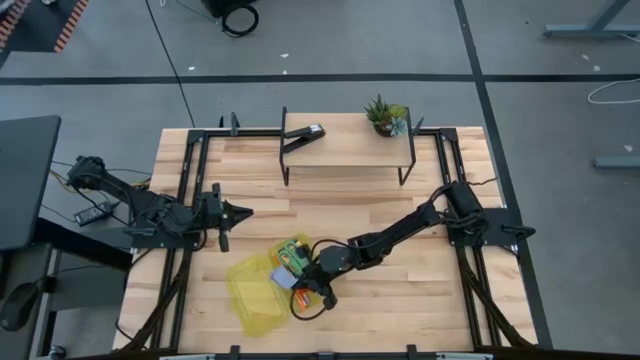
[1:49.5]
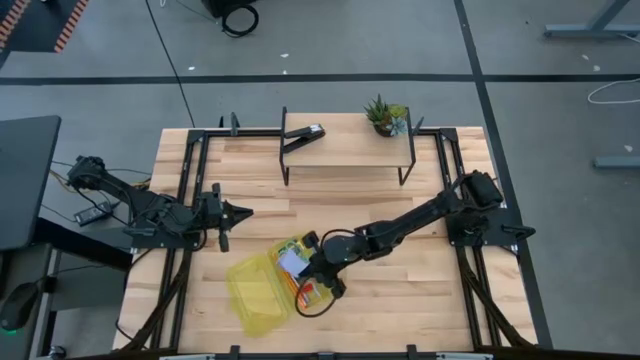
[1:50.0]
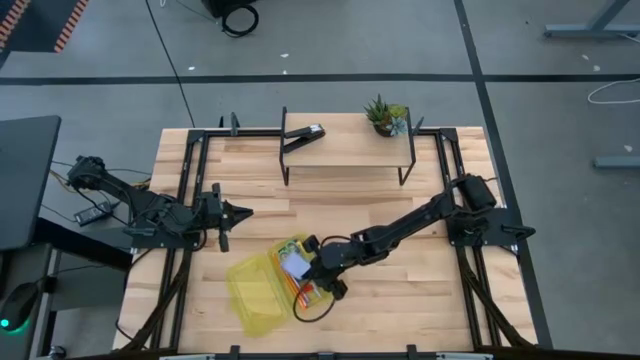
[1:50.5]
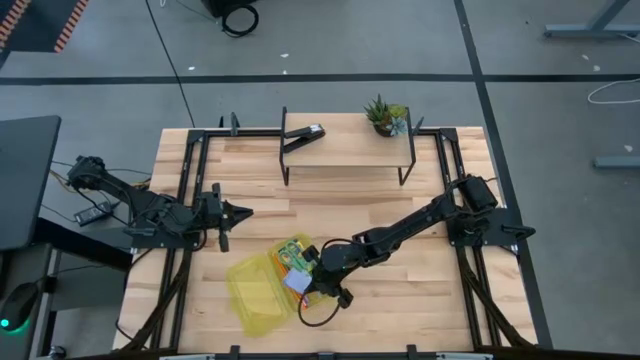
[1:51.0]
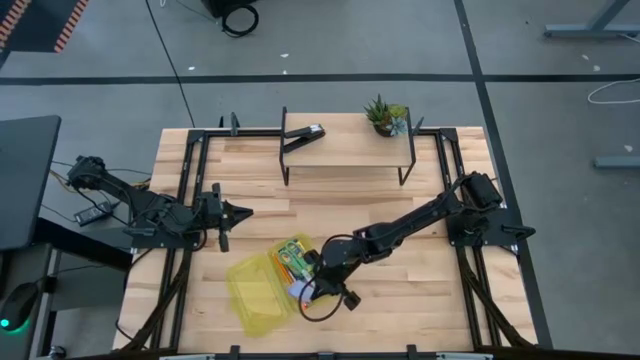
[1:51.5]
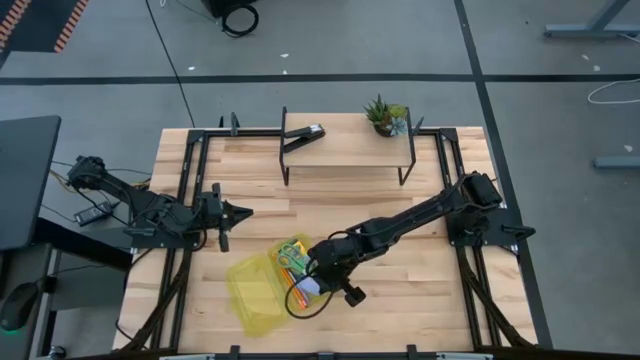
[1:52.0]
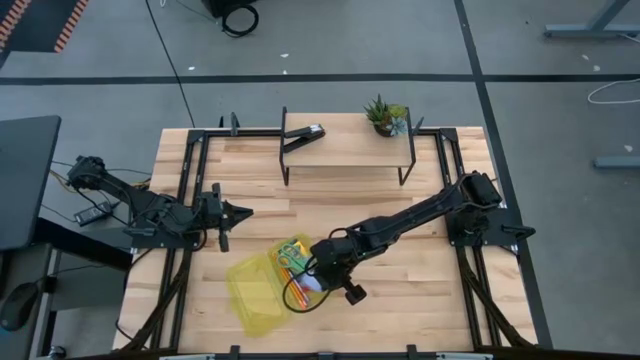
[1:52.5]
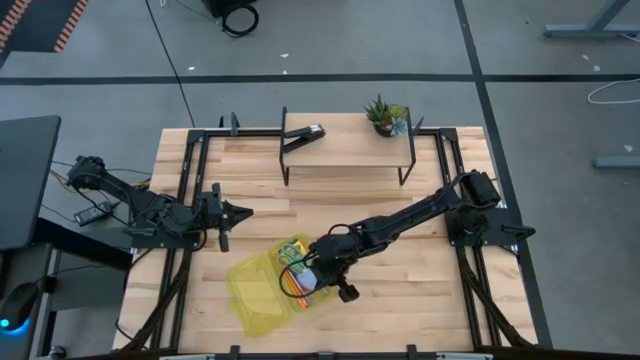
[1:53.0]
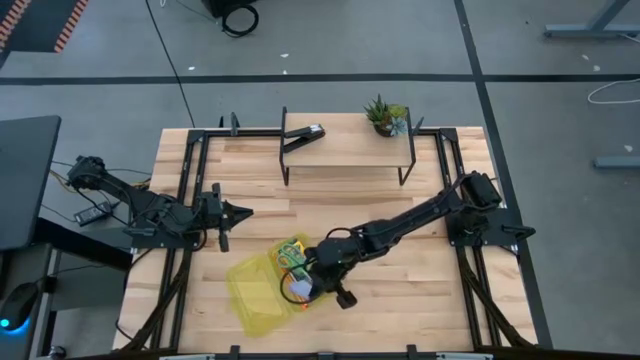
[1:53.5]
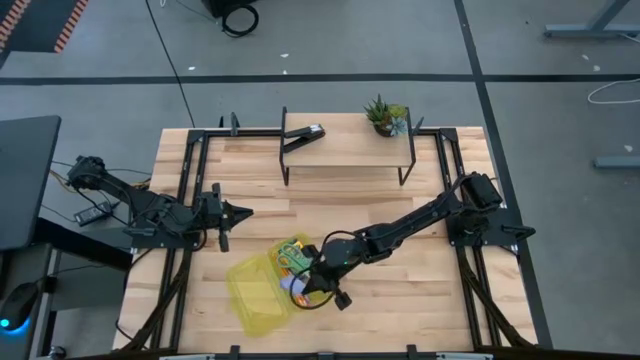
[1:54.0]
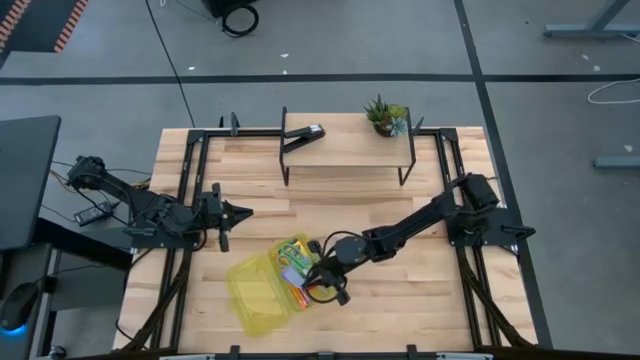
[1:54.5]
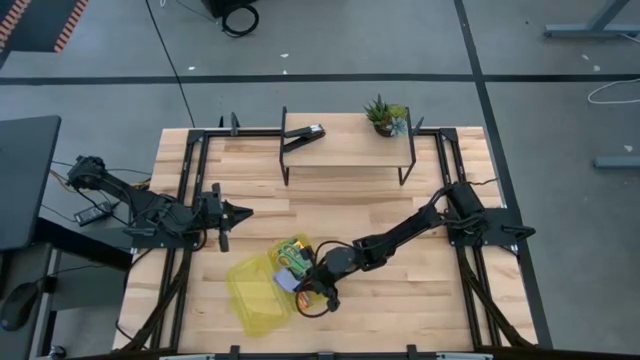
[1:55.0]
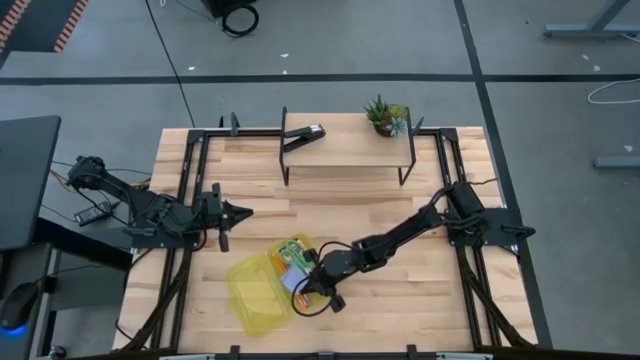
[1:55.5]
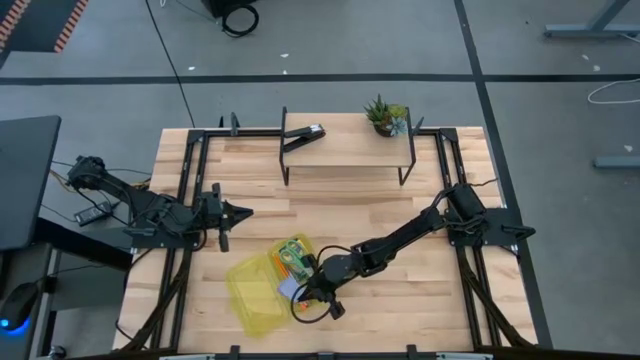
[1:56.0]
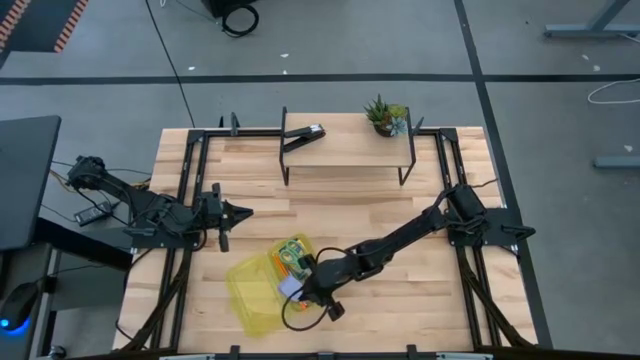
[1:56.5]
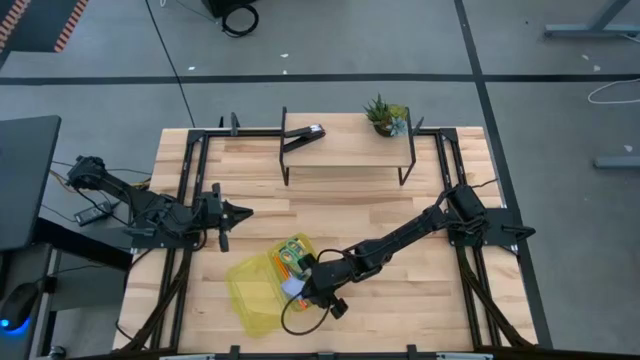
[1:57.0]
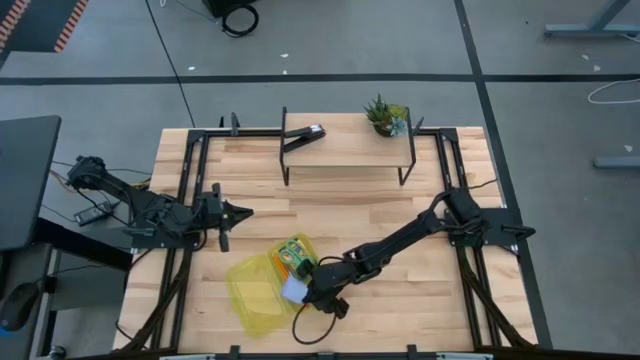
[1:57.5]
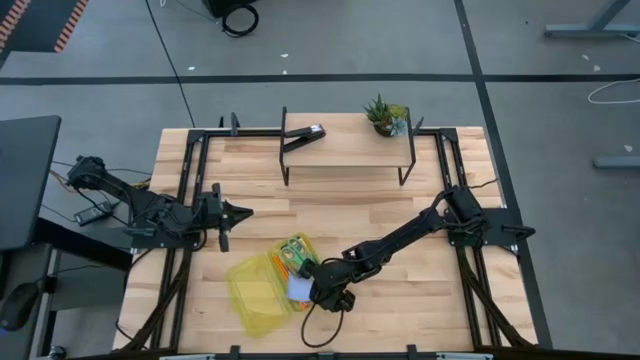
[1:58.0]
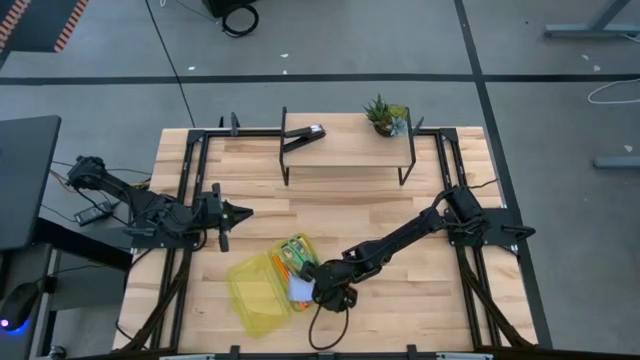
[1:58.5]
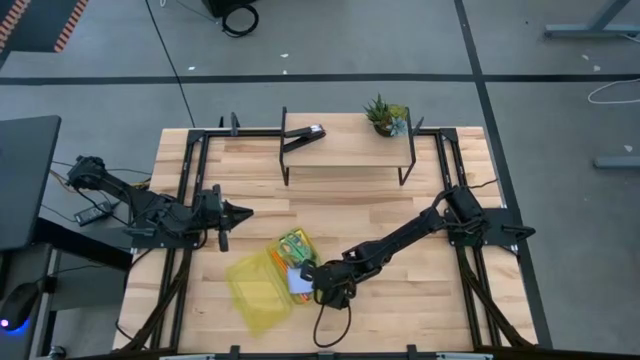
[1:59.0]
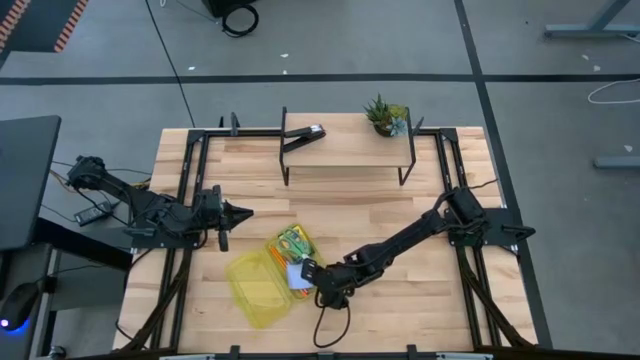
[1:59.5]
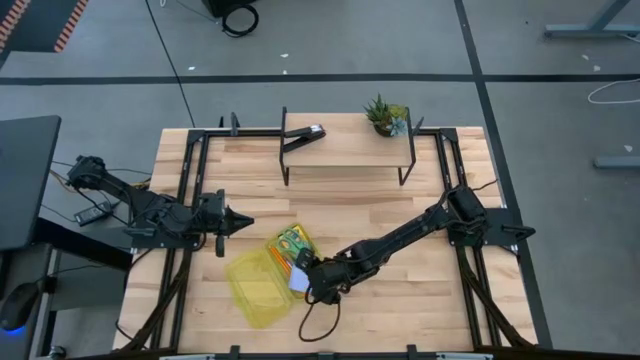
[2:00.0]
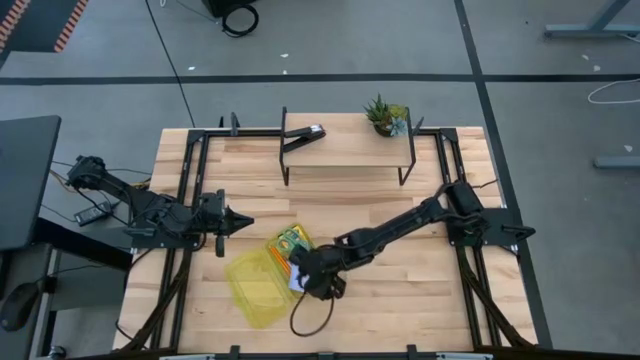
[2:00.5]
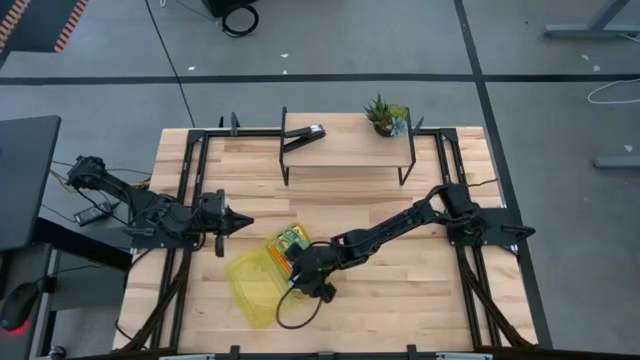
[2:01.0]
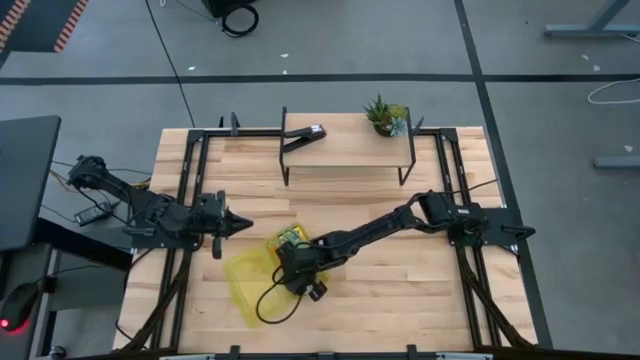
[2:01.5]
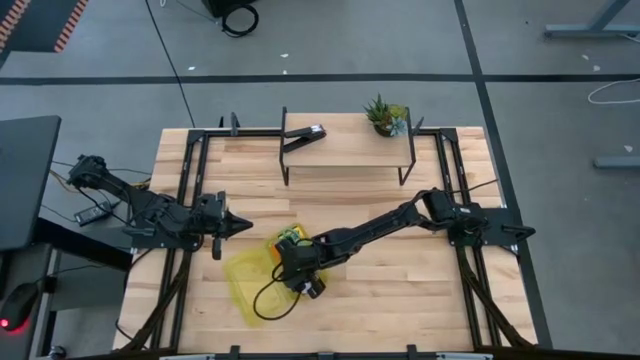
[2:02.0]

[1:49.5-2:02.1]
Task: Pack school essentials
Put the white sticky note into the supply box

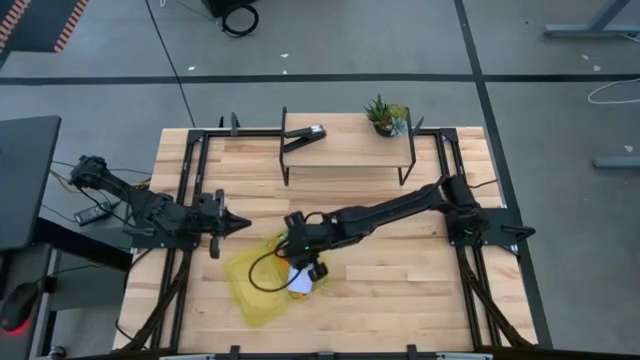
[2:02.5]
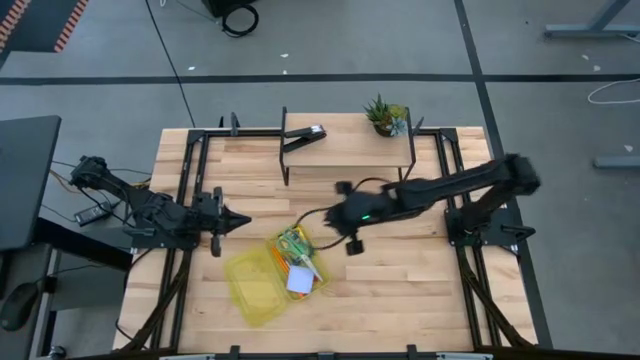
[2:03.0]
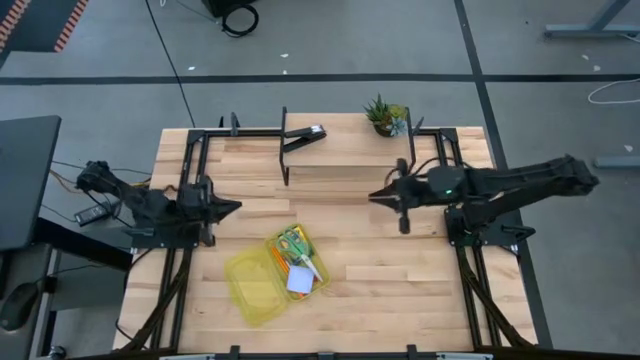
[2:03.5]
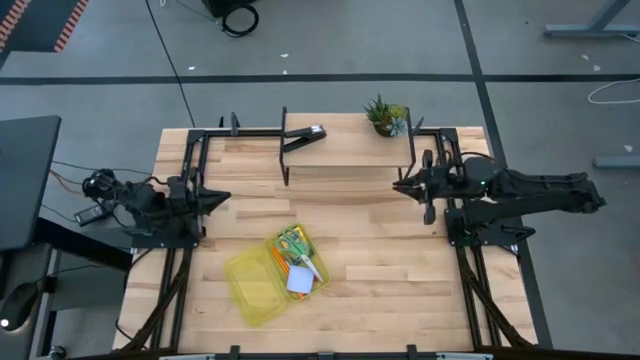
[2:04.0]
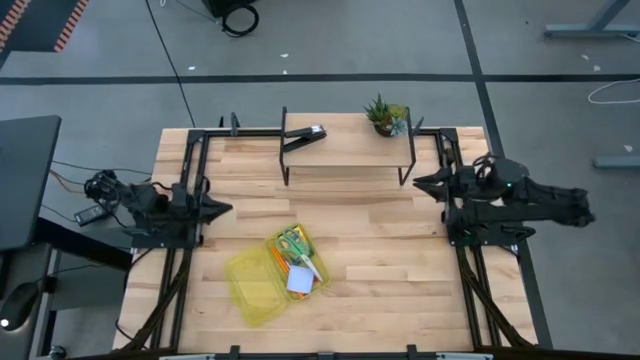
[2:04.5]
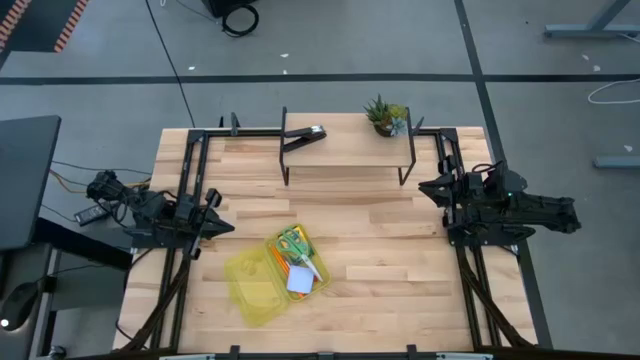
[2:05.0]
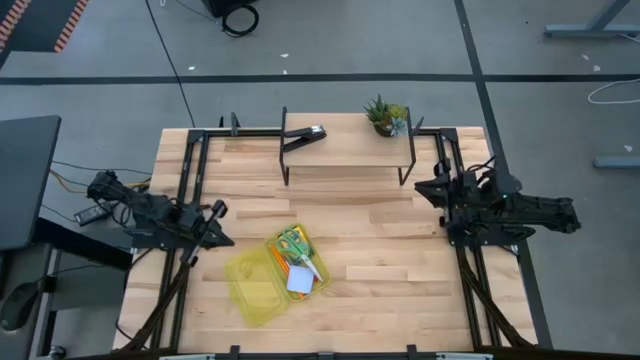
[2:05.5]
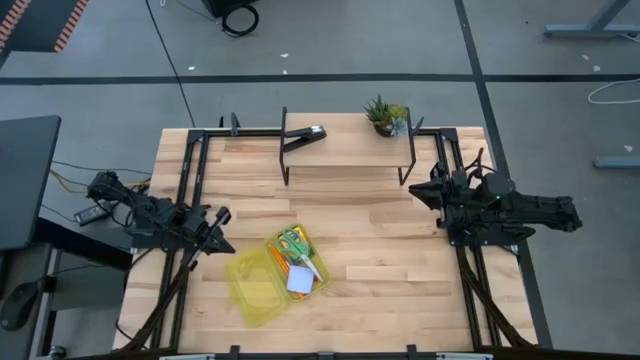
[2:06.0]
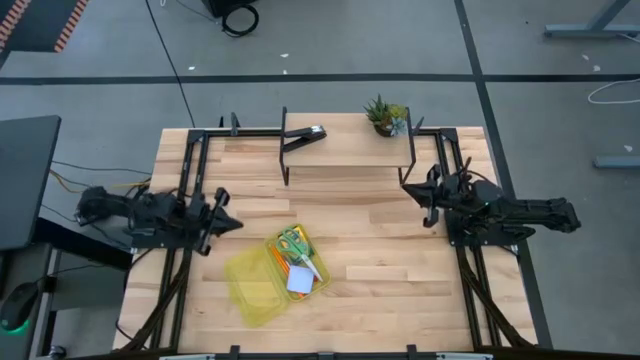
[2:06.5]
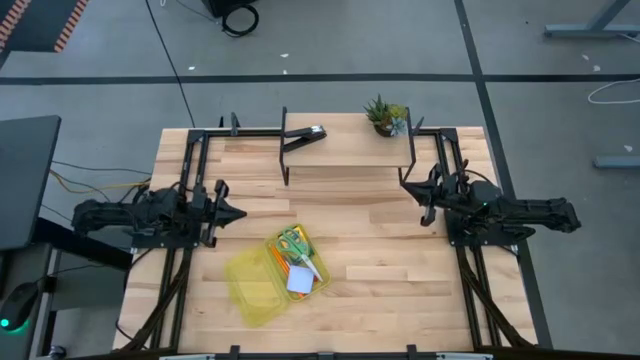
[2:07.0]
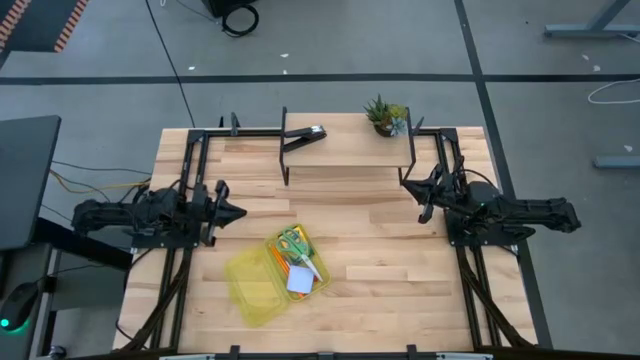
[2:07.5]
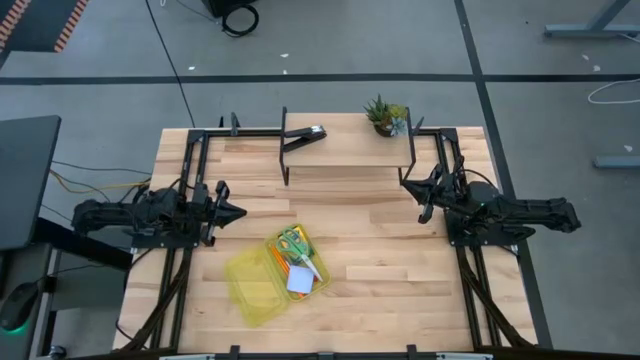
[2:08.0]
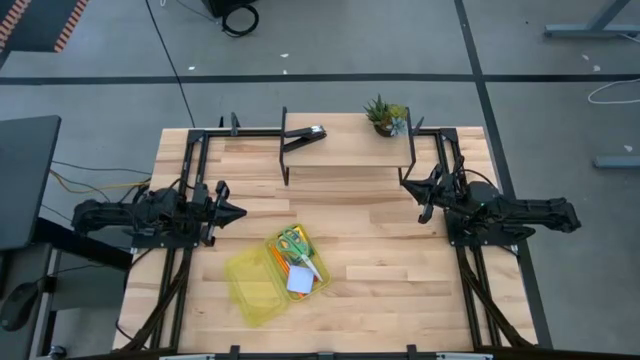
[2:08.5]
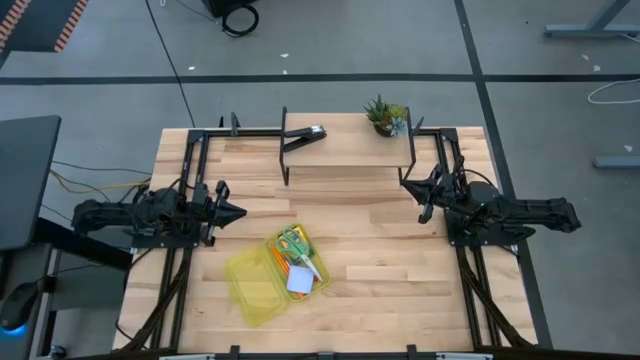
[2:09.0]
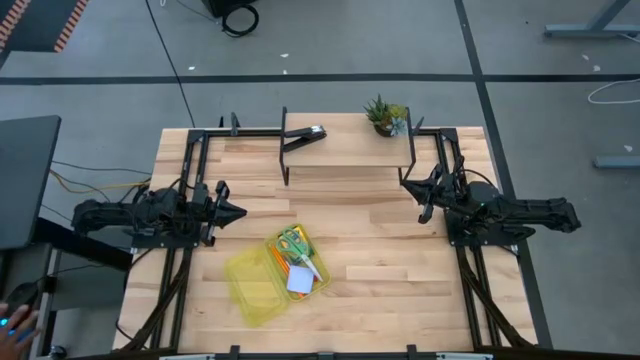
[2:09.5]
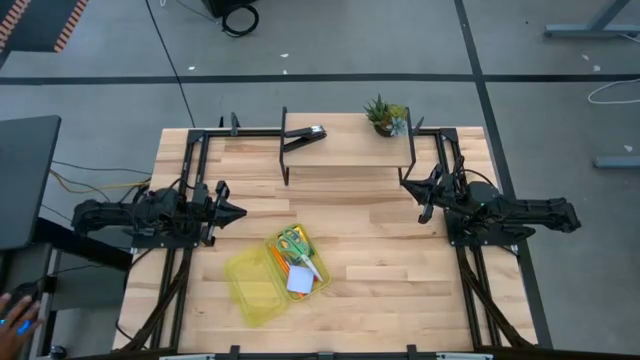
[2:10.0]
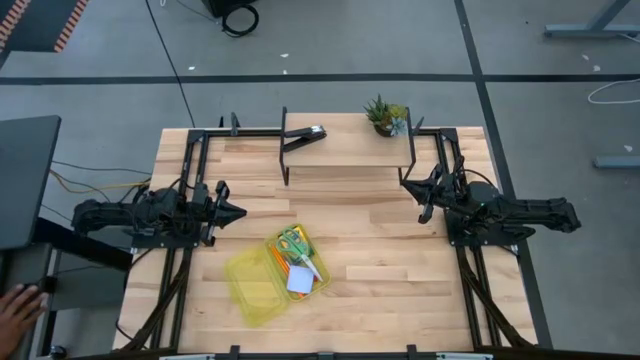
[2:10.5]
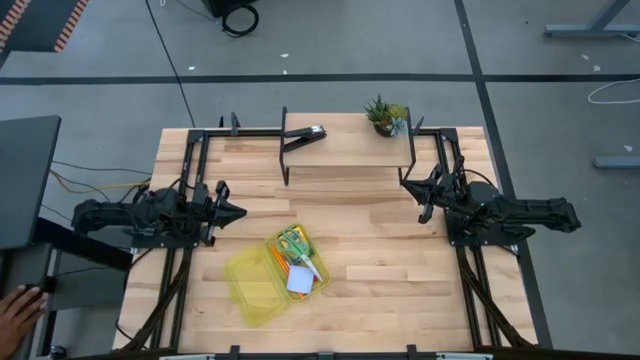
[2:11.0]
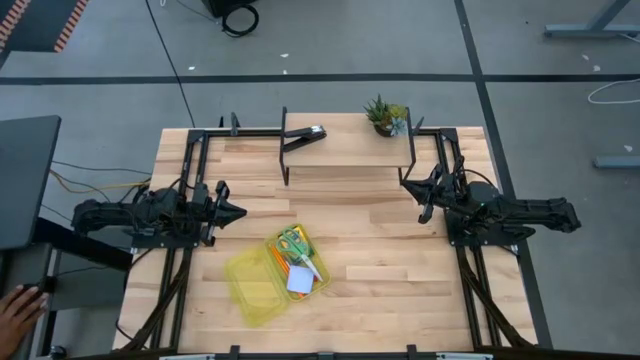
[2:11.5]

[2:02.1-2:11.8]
Return to Home Position
